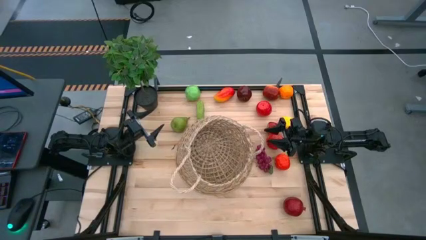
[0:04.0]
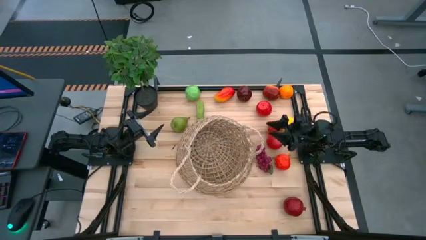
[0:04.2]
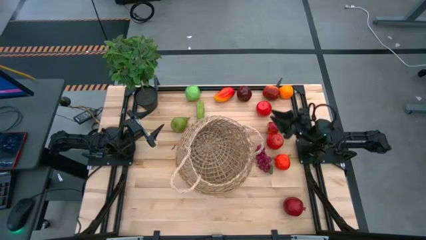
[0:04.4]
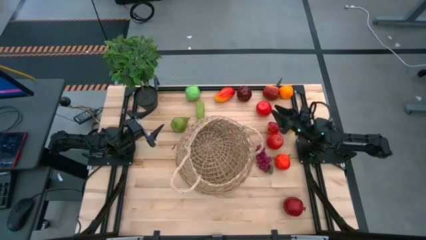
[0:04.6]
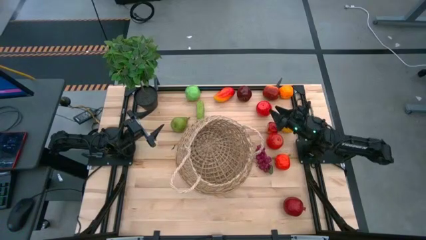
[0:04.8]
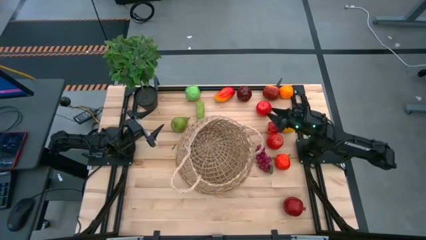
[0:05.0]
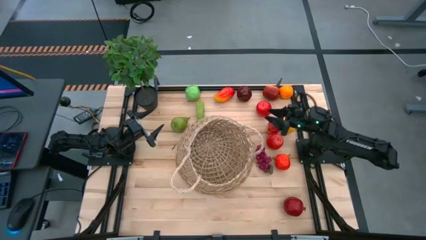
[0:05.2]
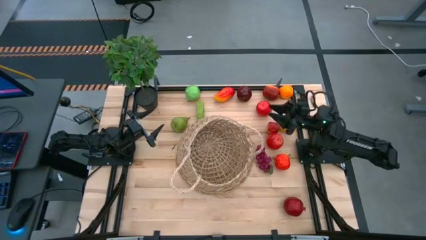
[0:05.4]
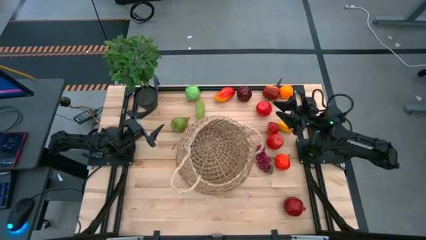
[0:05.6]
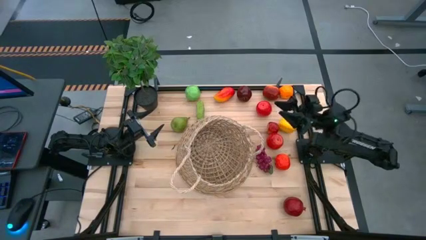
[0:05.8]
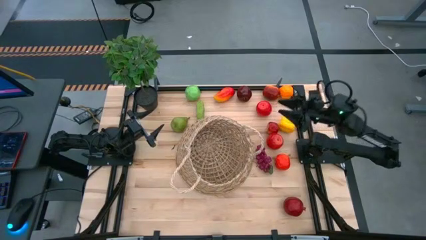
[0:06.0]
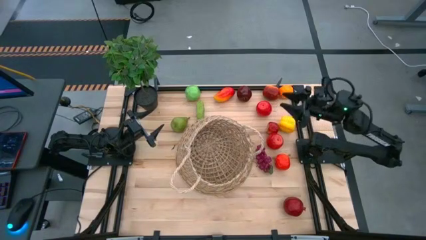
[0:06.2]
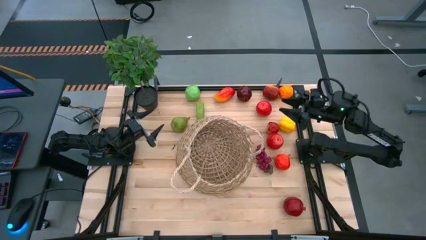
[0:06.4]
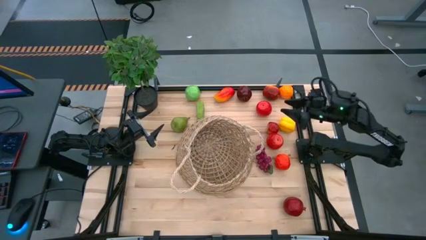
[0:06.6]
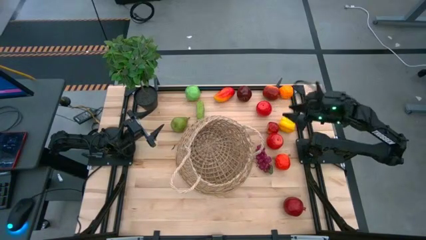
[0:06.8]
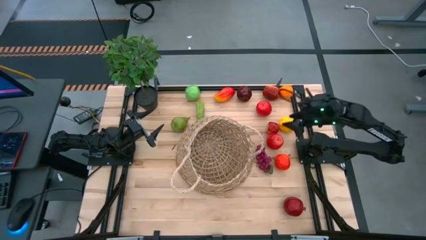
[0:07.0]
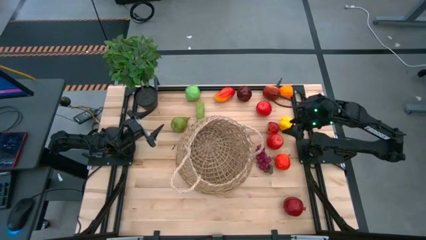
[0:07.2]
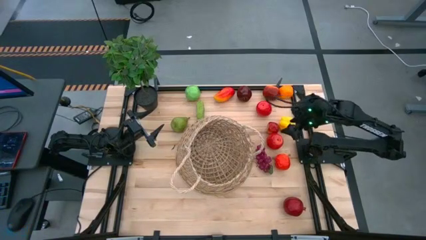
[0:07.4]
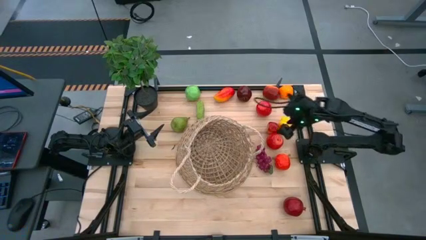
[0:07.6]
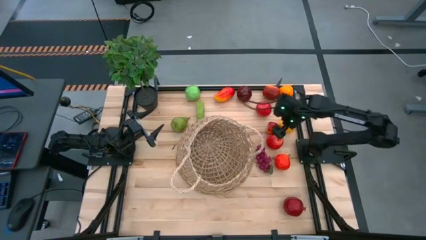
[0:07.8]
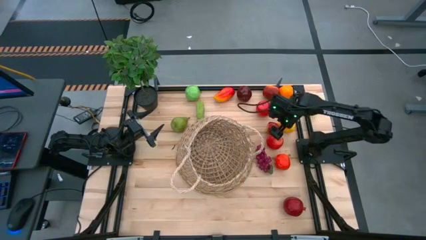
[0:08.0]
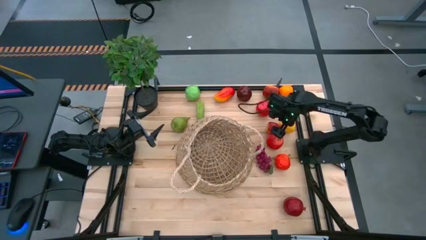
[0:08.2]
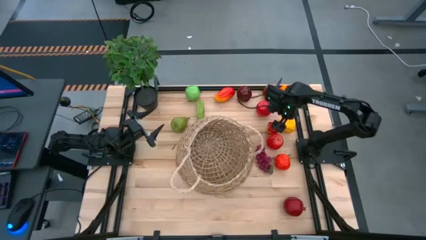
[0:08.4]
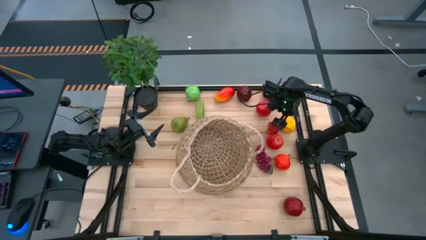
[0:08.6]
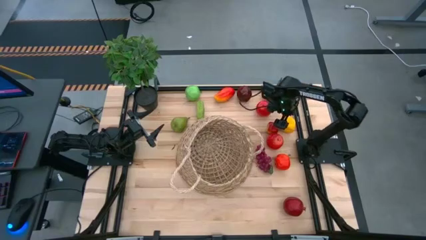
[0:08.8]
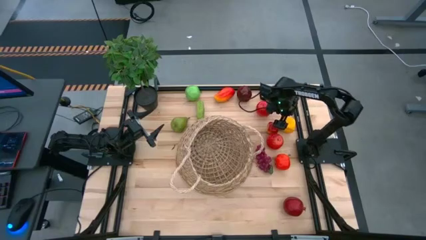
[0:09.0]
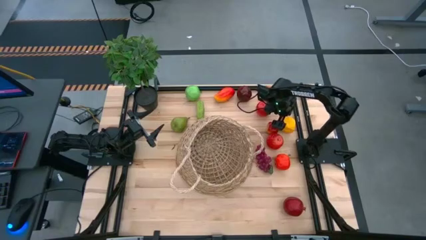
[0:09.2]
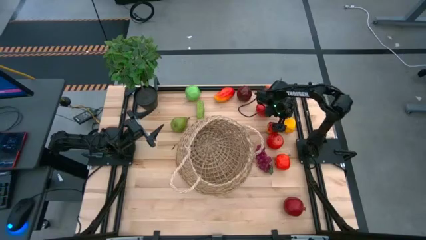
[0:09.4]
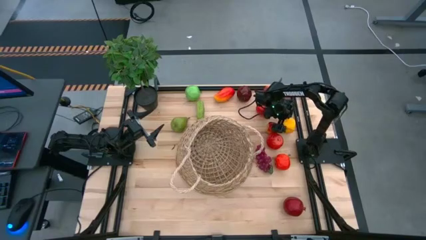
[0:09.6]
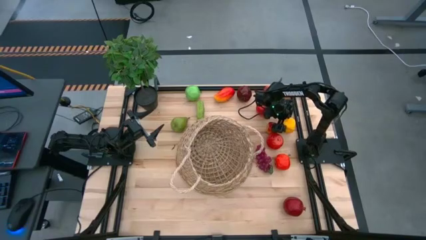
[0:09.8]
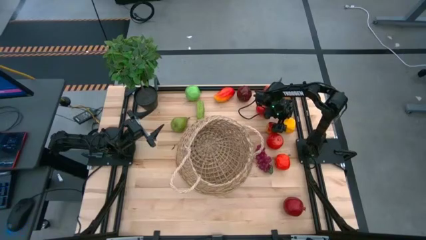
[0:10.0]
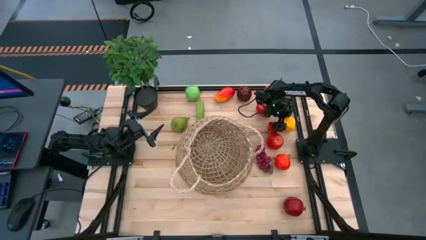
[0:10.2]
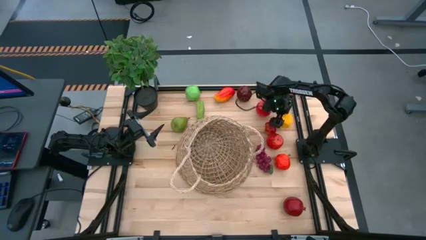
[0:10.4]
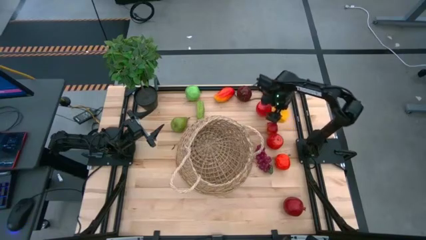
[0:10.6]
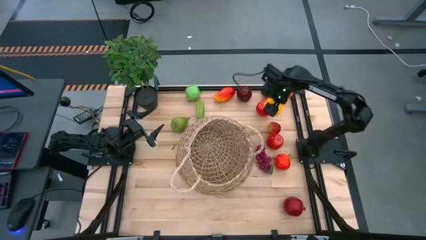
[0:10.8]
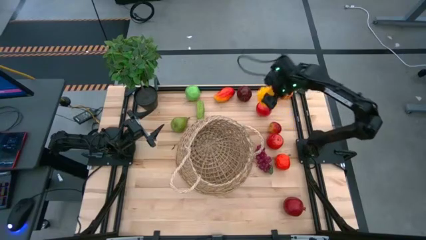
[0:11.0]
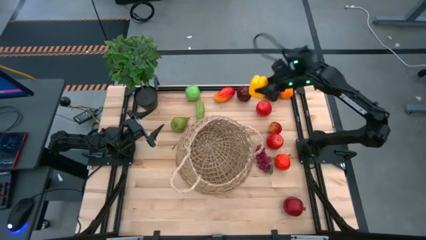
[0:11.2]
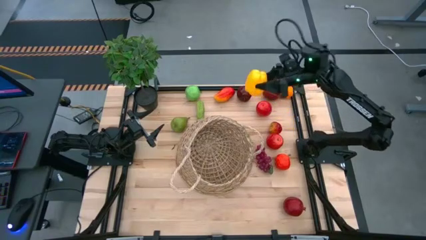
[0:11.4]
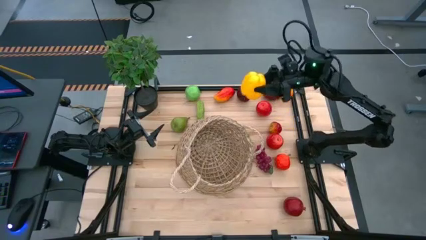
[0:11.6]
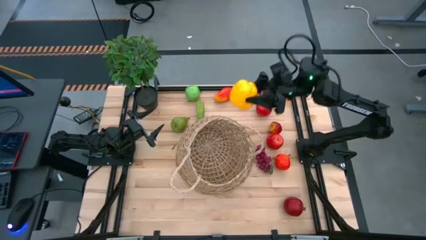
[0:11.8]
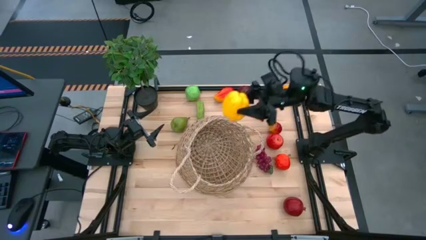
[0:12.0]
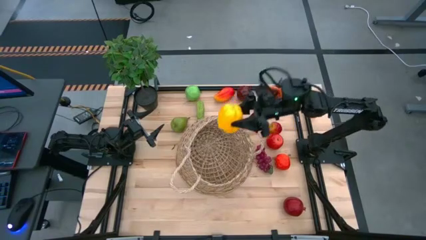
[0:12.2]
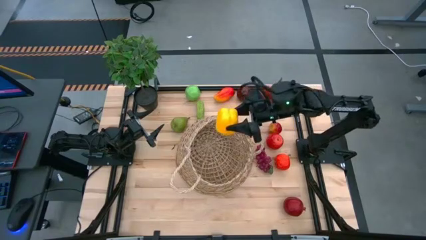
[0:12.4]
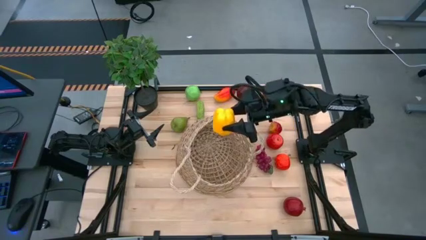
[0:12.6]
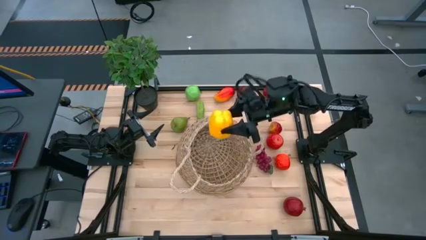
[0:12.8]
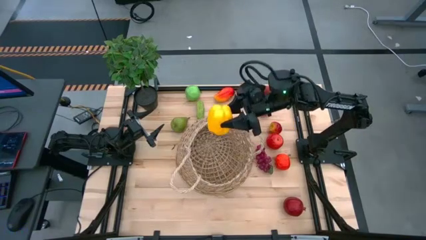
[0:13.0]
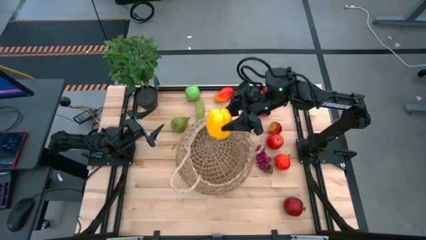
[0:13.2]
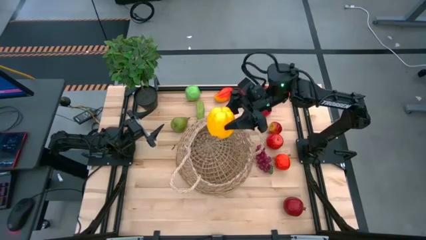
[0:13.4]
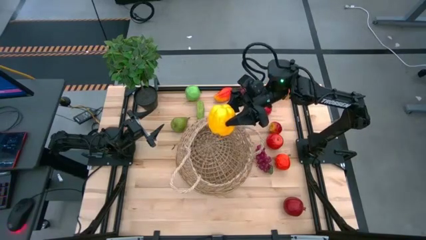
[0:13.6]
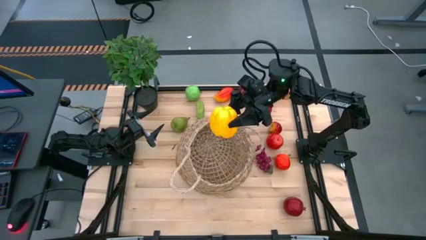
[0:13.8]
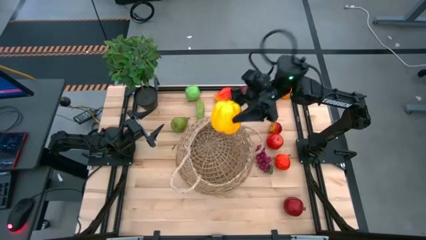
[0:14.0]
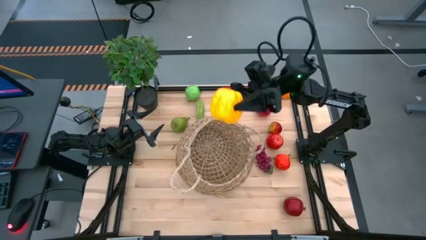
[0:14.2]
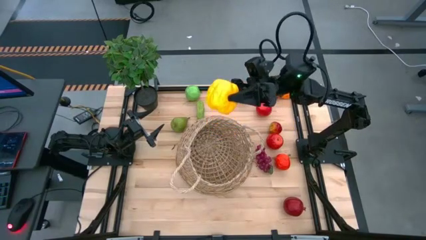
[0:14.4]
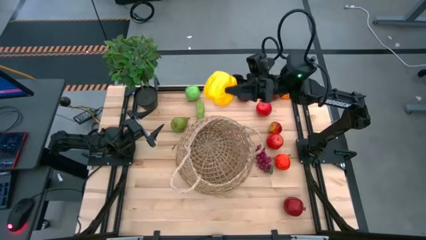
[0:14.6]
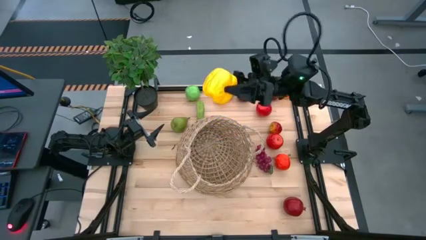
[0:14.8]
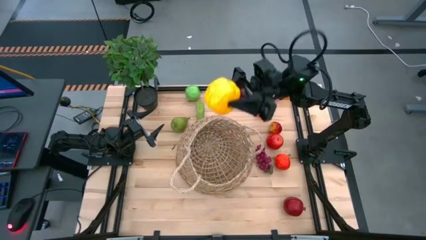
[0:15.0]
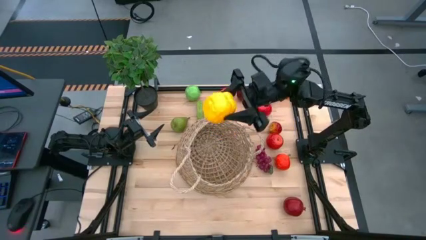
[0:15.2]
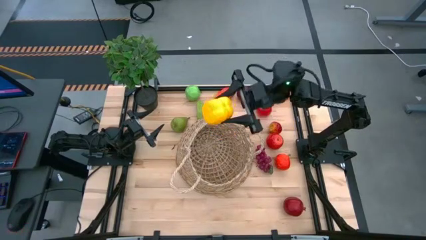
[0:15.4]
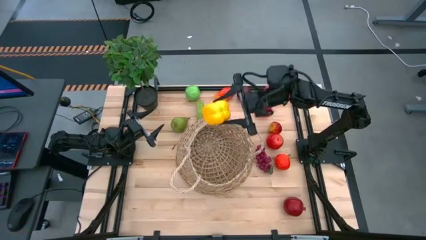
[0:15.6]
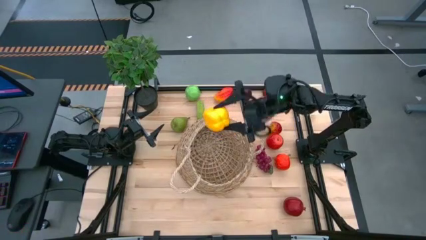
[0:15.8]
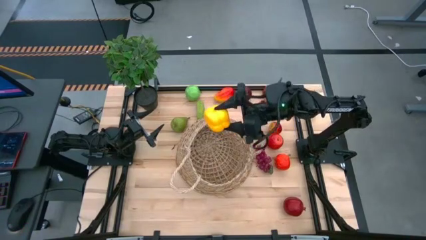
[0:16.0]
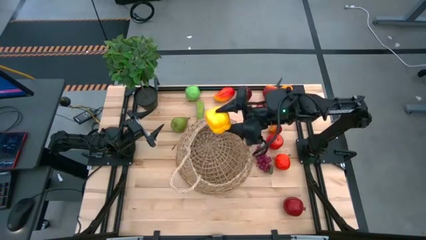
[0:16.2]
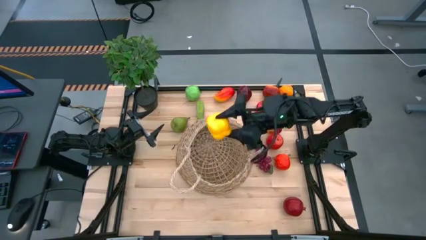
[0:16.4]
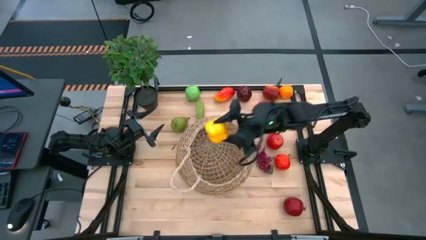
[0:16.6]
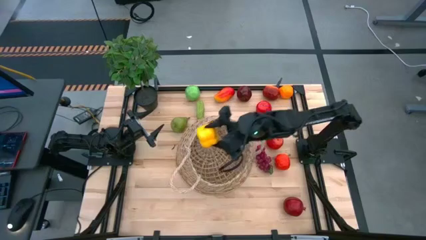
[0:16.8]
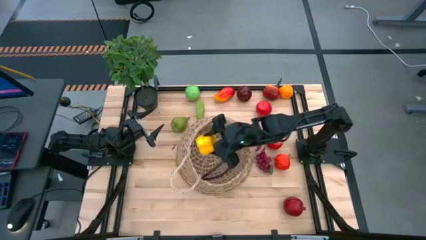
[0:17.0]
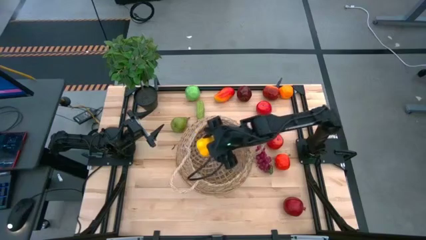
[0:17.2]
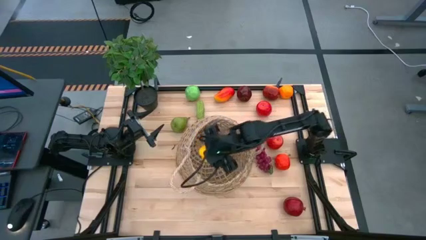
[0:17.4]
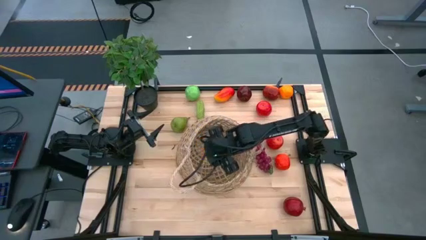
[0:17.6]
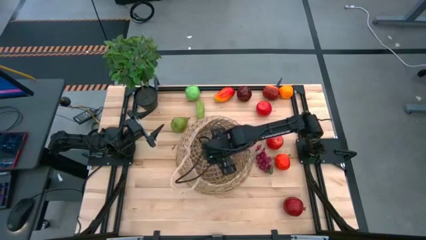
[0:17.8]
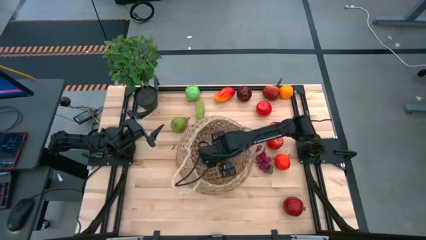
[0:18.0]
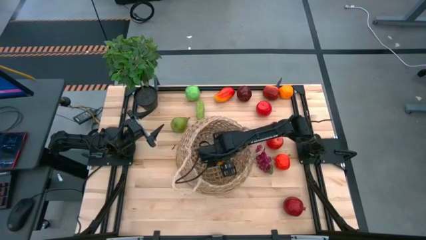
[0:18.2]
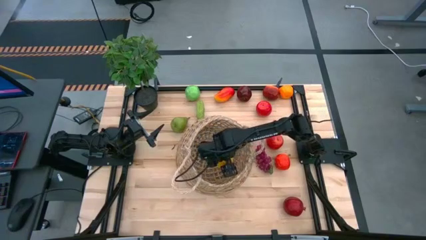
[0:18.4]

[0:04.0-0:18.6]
Task: Build produce basket
Put the bell pepper into the woven basket
